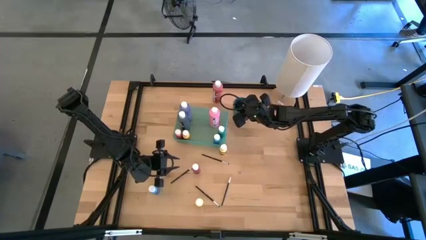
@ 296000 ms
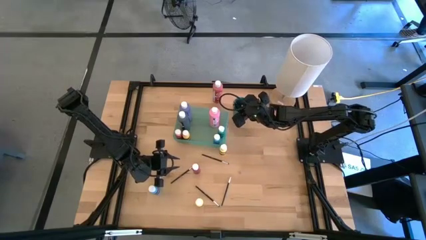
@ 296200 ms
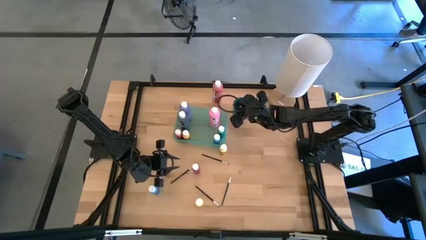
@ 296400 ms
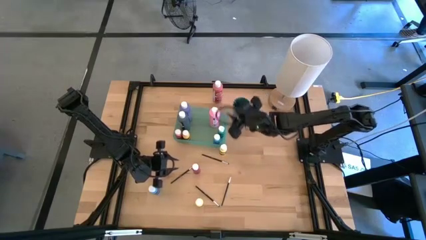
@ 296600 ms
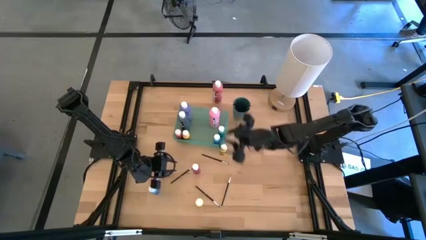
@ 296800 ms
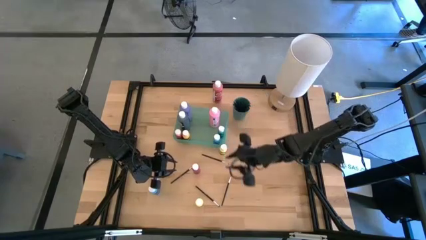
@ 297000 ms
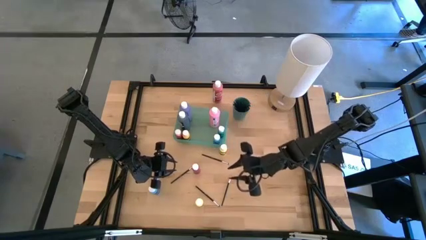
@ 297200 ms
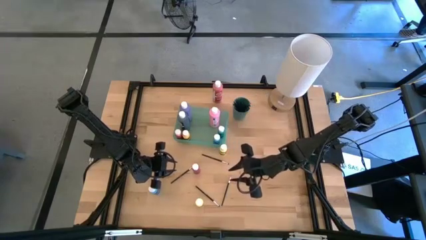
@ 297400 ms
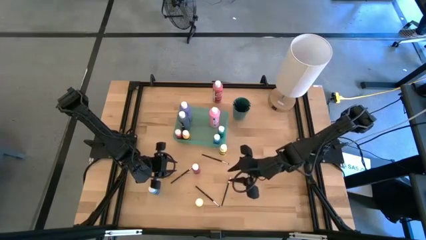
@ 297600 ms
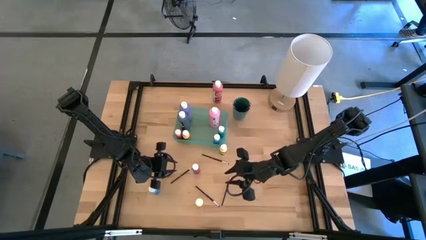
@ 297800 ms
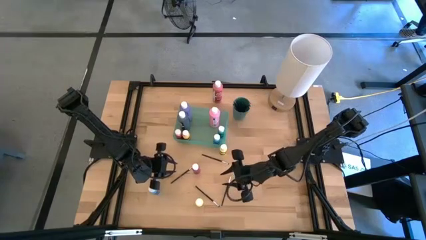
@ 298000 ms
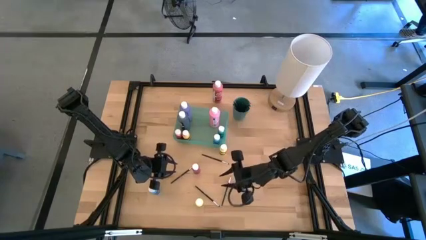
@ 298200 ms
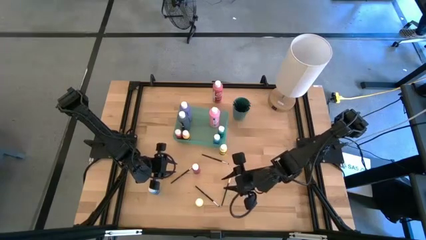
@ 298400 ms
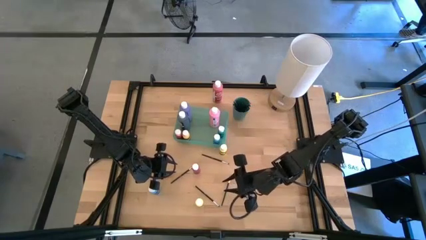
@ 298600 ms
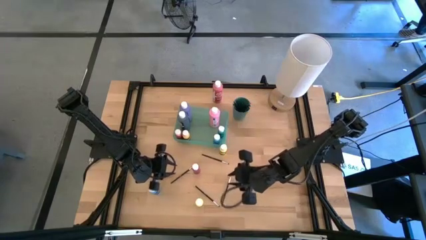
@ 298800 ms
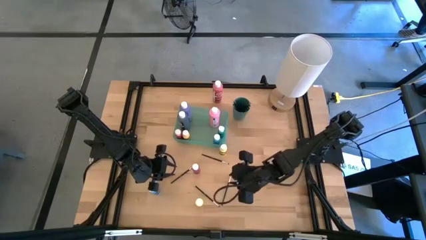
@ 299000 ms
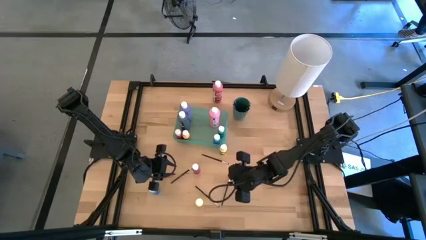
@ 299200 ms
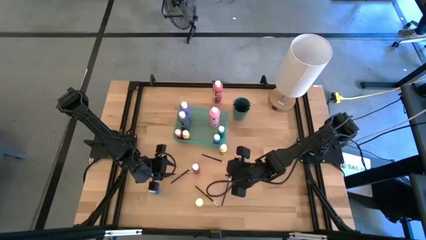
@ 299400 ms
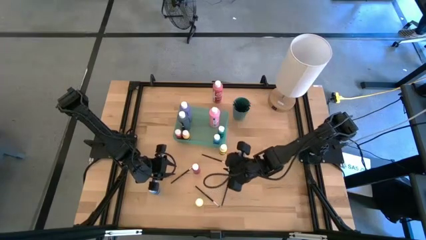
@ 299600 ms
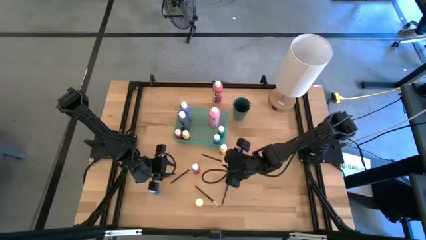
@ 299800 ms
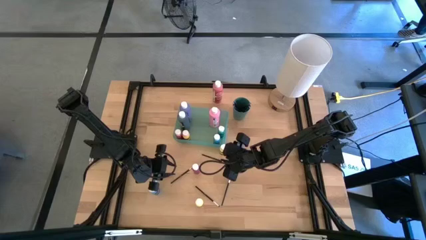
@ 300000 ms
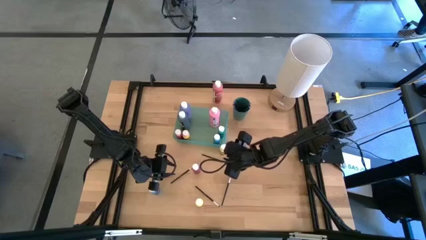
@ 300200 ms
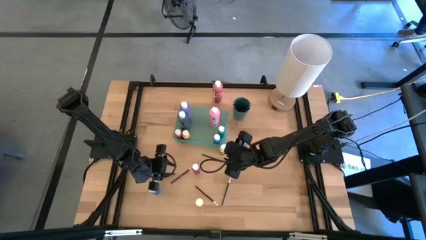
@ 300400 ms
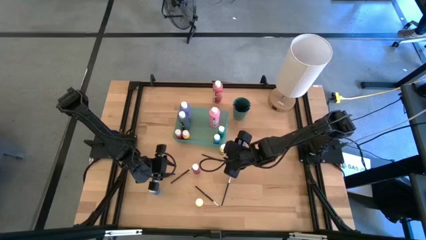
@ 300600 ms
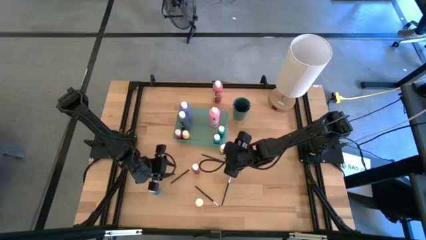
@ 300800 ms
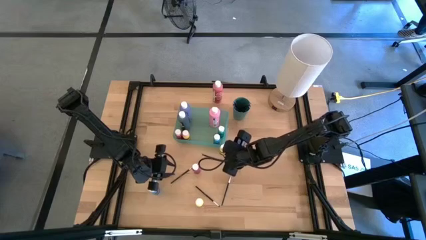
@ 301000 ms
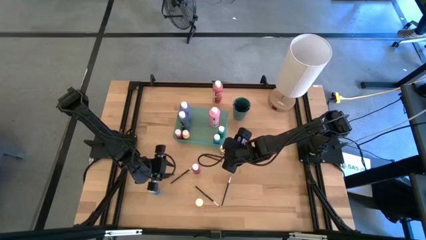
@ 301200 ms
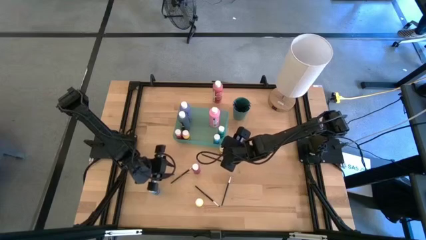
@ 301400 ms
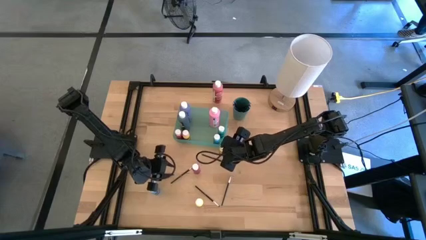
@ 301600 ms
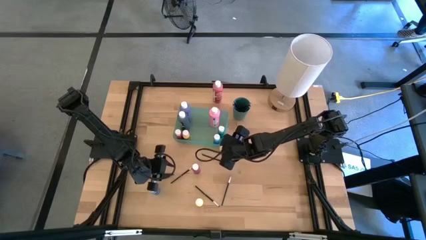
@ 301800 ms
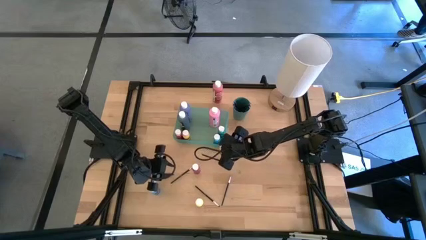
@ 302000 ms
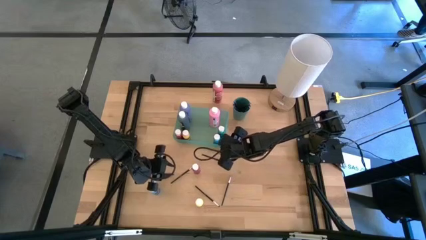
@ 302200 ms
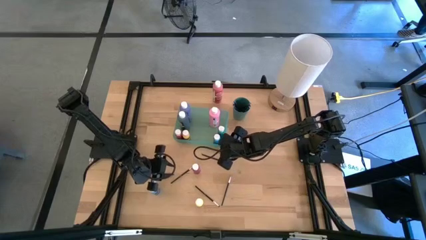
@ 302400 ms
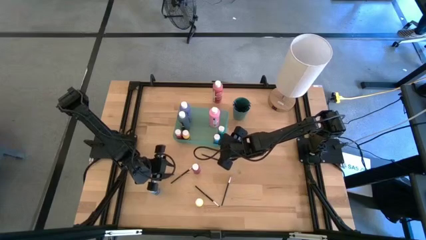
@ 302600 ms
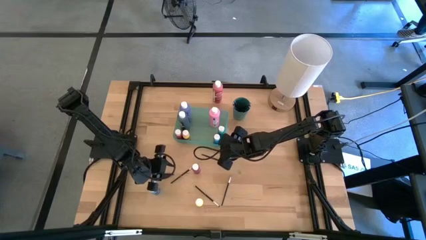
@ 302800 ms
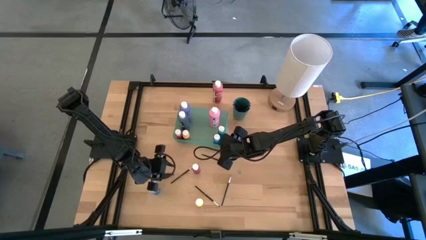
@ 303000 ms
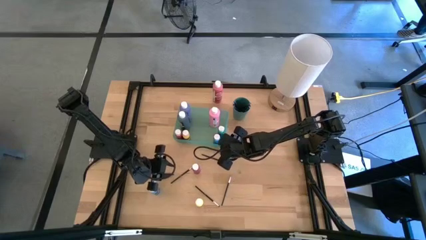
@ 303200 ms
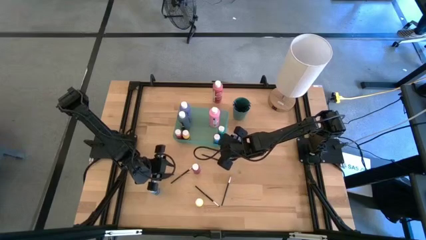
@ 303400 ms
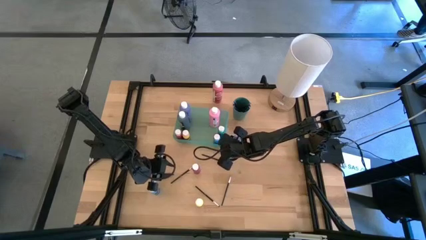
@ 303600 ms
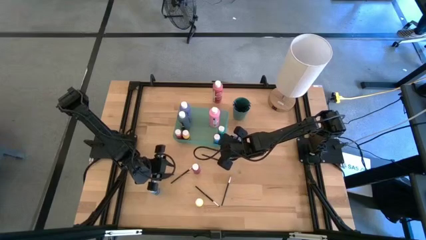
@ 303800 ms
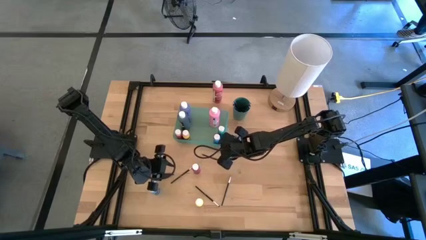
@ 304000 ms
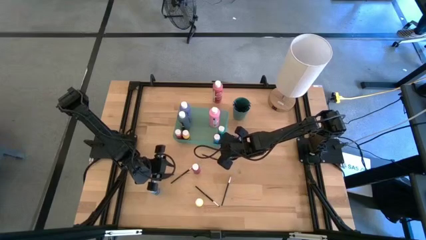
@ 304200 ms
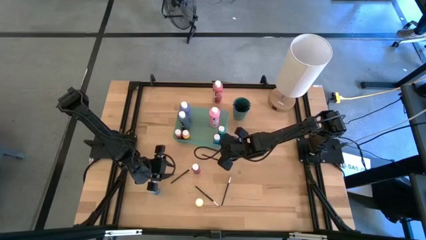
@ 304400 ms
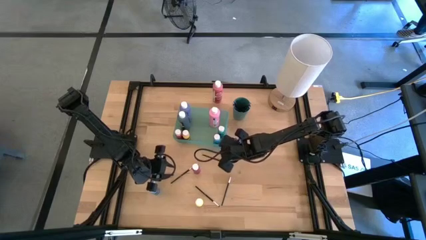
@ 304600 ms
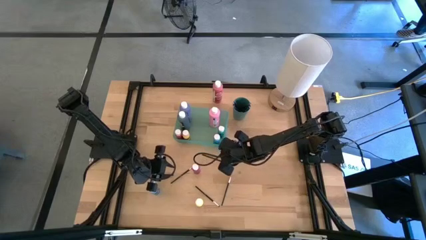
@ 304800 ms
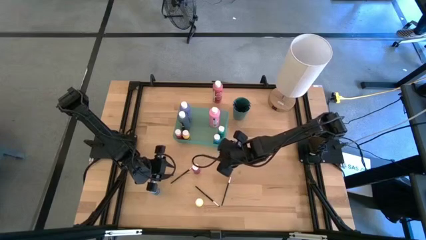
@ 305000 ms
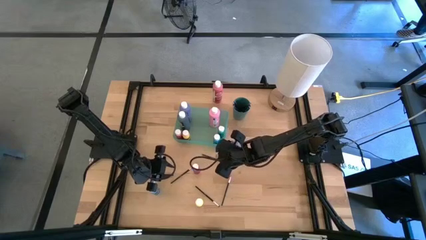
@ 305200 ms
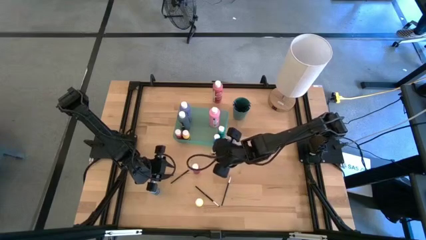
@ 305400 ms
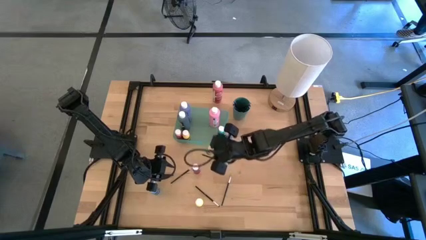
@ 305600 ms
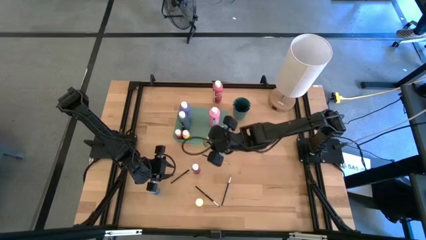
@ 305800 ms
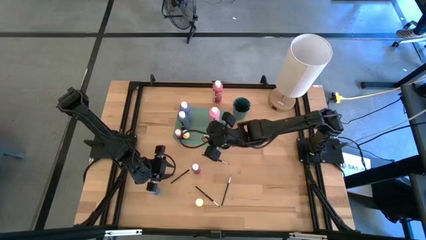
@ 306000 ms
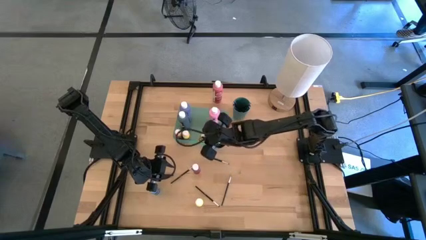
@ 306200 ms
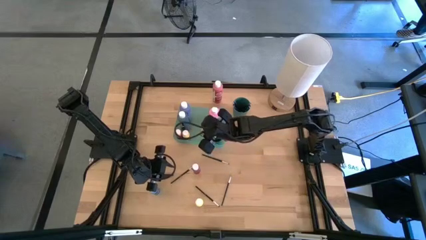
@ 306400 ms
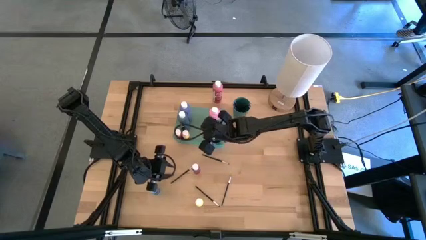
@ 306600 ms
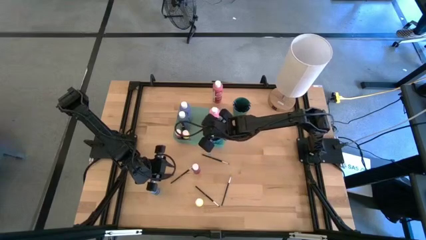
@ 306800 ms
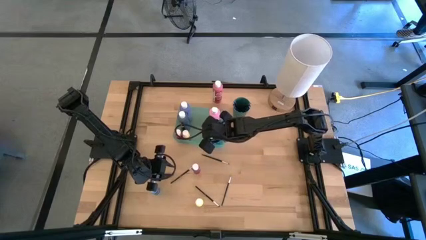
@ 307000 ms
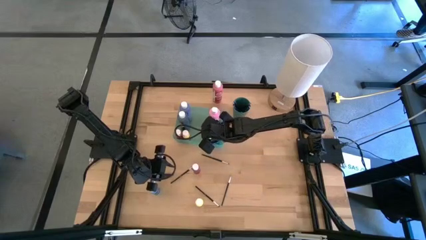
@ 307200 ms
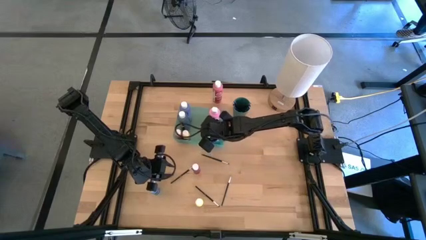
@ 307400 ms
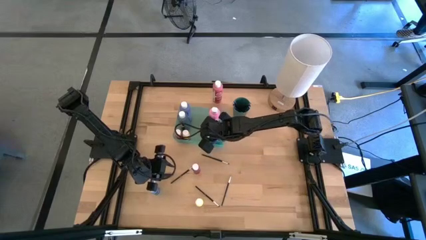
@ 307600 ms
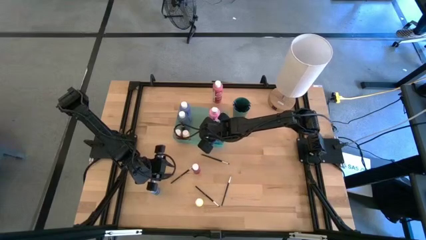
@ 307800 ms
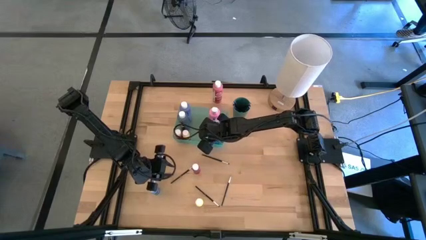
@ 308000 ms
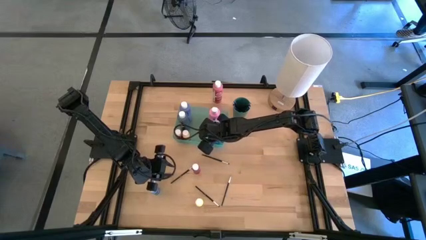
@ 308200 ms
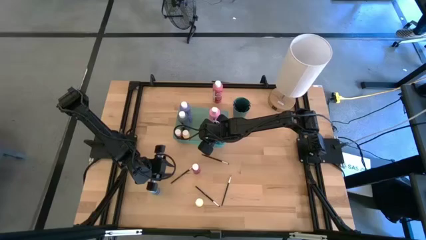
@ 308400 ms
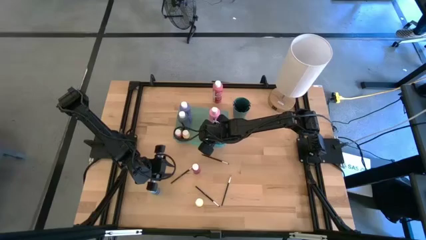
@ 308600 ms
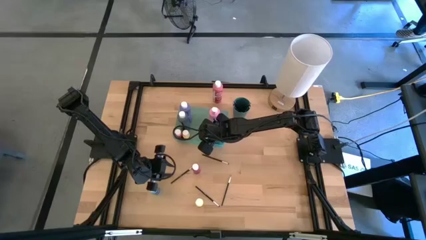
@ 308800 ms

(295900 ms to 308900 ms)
Task: Pick & Place Paint Supplies
Put the top small yellow paint bottle into the green bin
